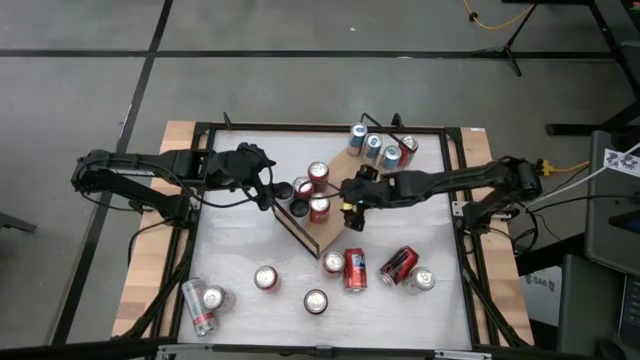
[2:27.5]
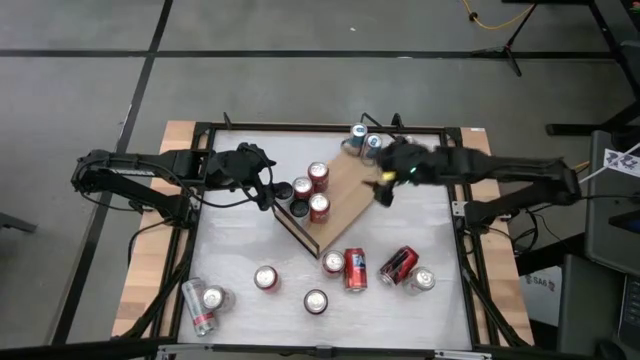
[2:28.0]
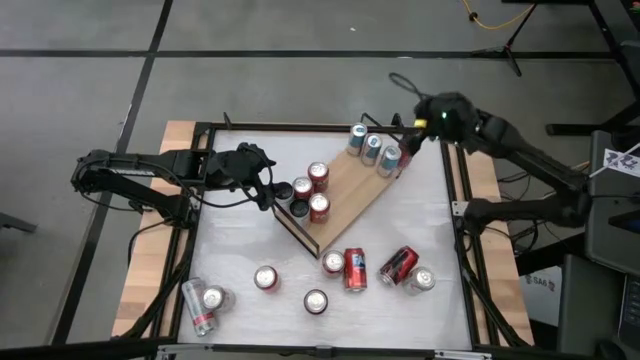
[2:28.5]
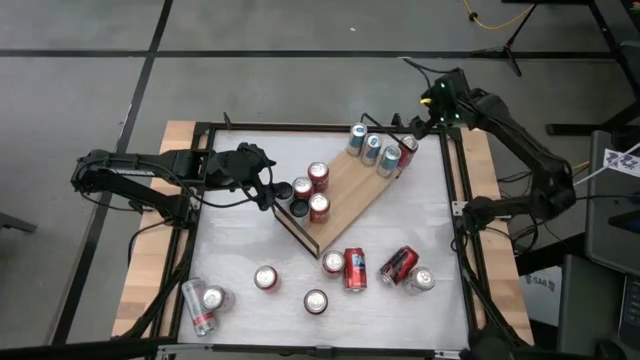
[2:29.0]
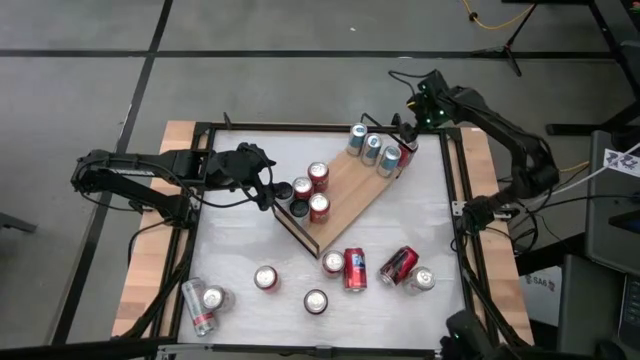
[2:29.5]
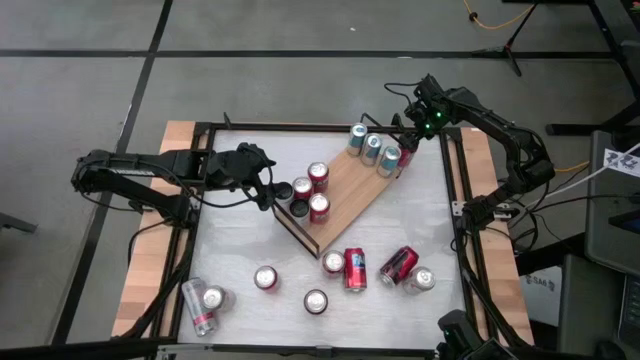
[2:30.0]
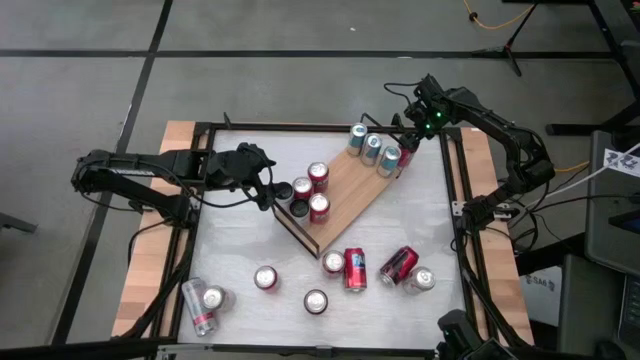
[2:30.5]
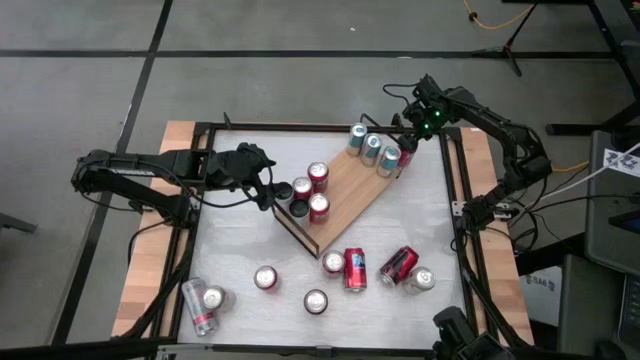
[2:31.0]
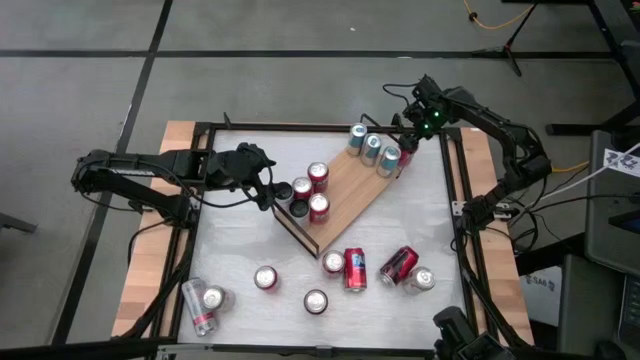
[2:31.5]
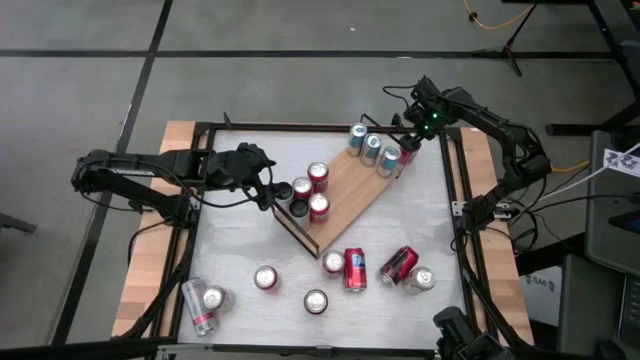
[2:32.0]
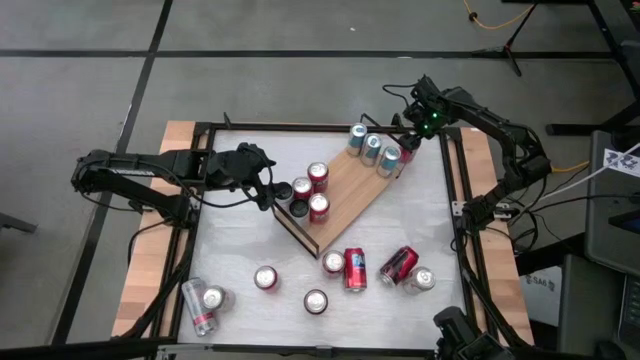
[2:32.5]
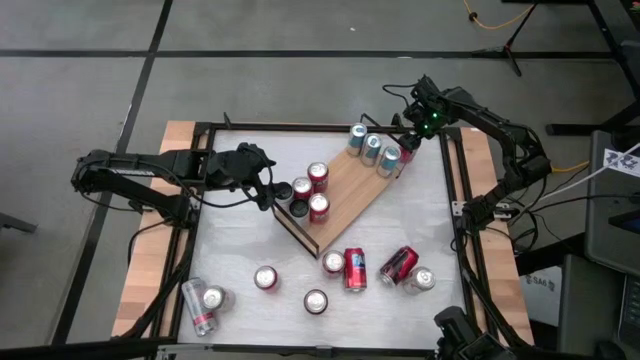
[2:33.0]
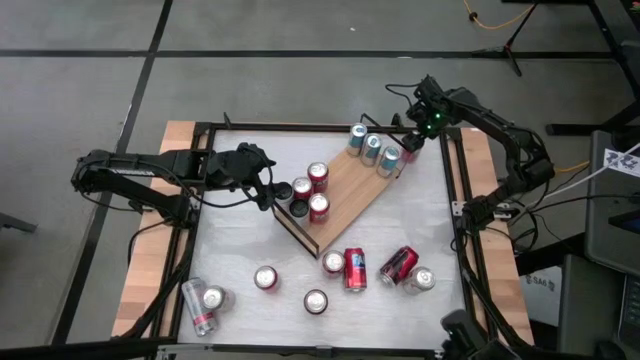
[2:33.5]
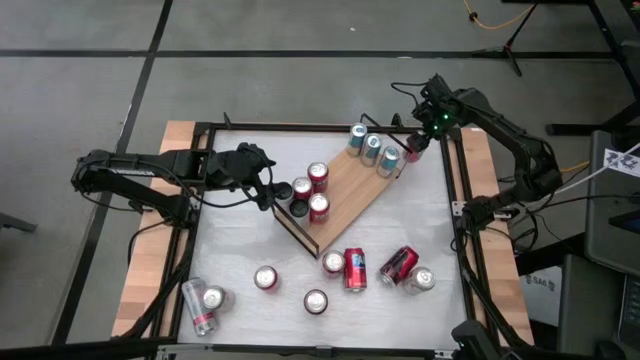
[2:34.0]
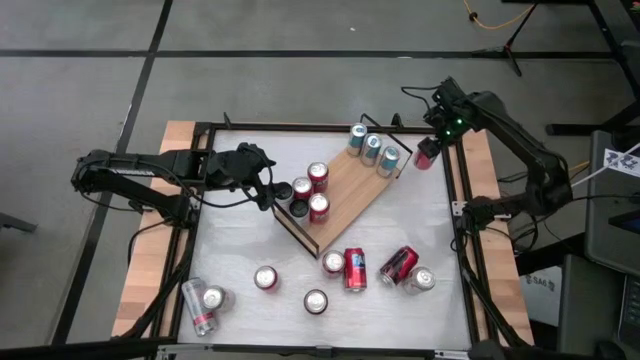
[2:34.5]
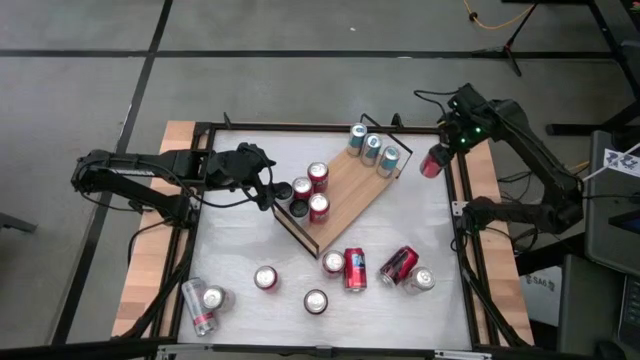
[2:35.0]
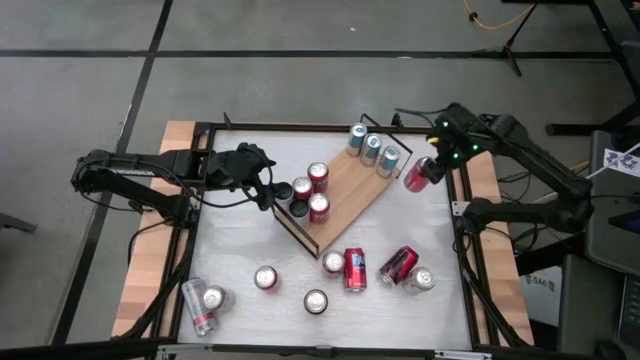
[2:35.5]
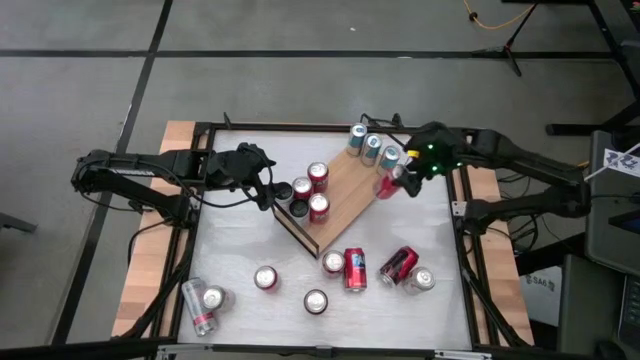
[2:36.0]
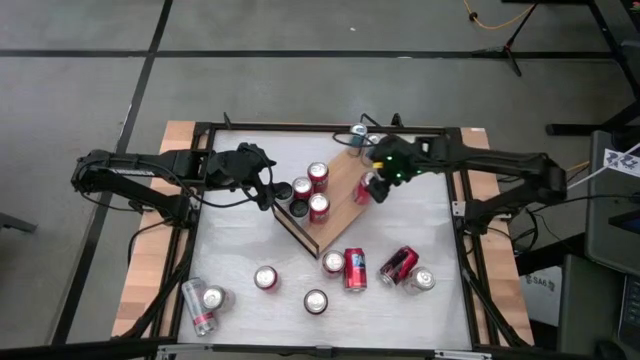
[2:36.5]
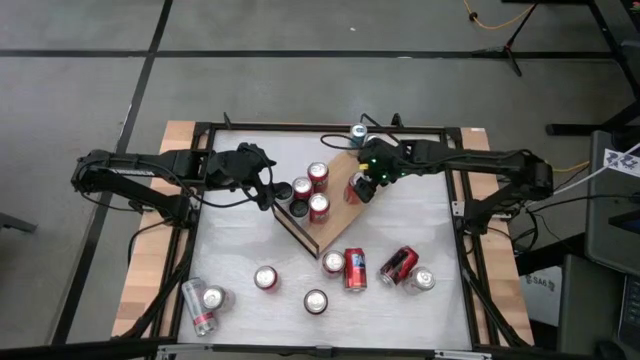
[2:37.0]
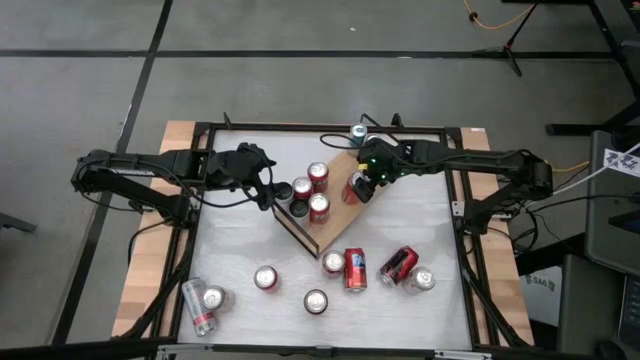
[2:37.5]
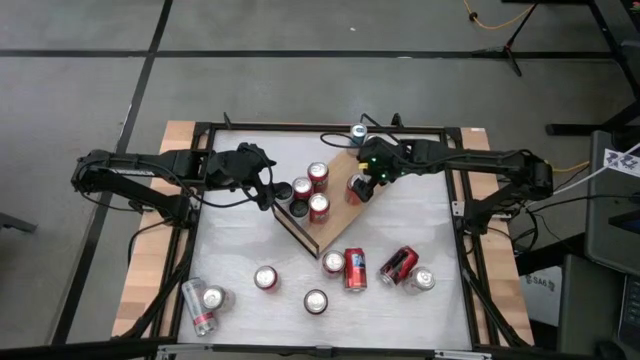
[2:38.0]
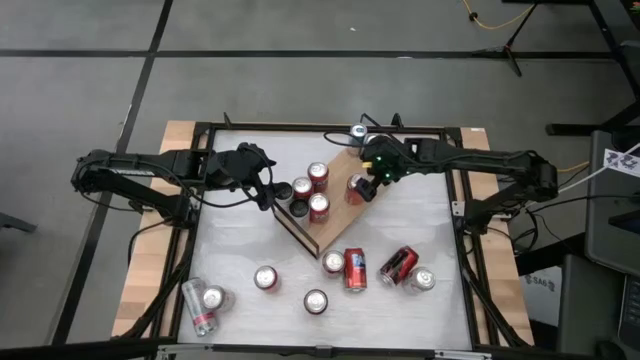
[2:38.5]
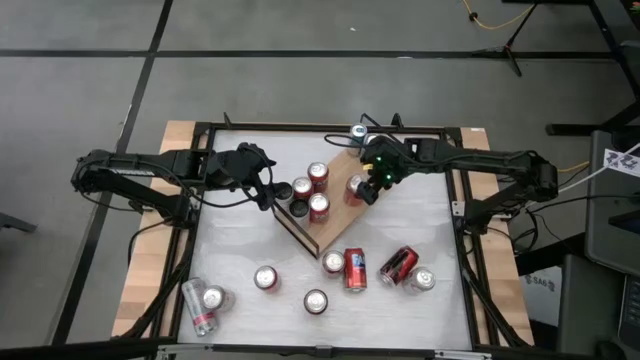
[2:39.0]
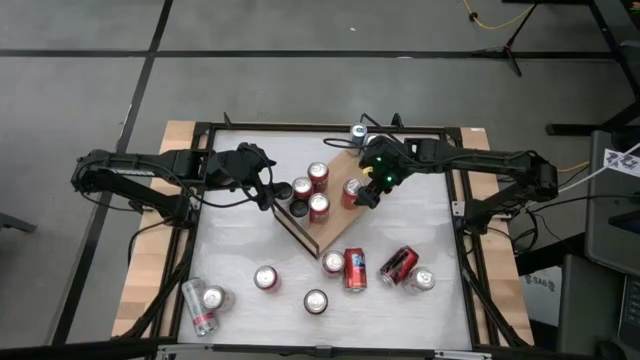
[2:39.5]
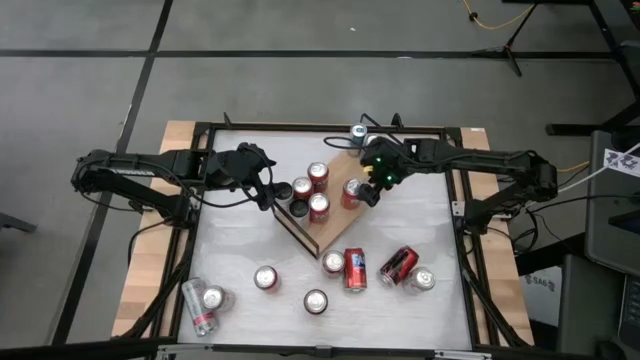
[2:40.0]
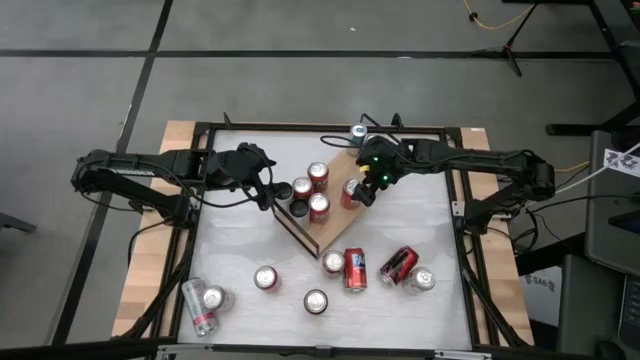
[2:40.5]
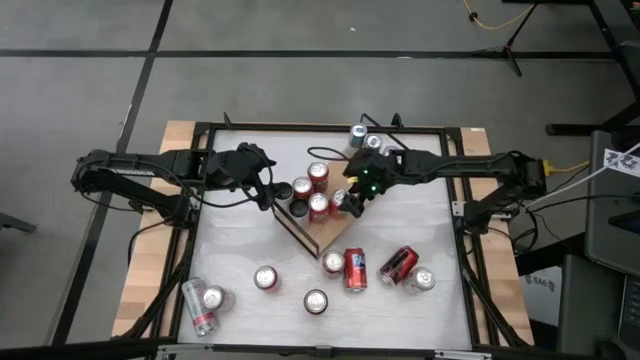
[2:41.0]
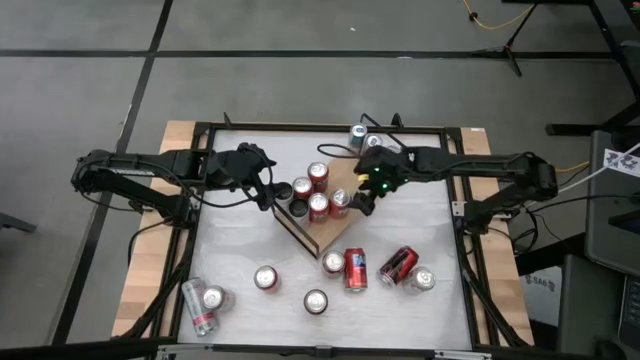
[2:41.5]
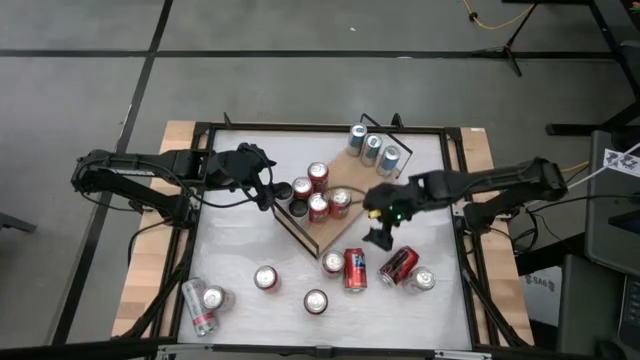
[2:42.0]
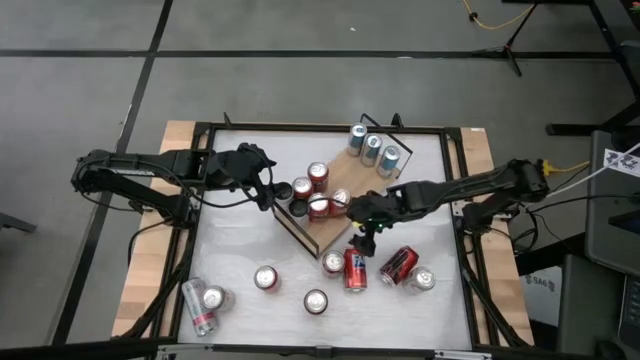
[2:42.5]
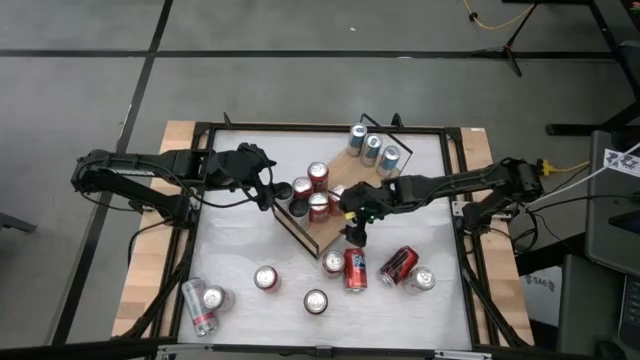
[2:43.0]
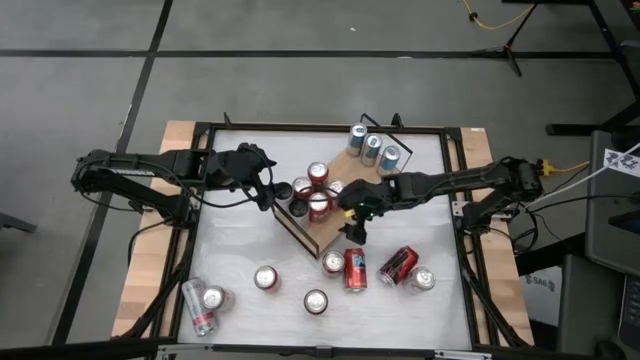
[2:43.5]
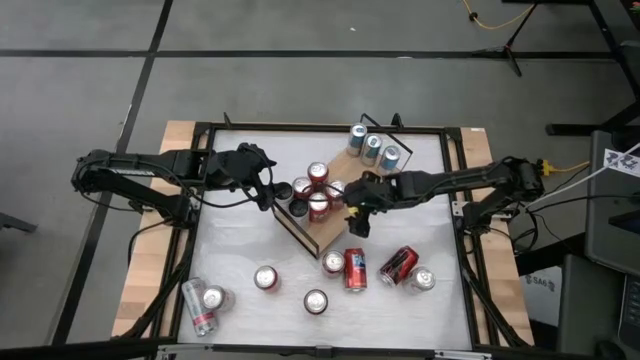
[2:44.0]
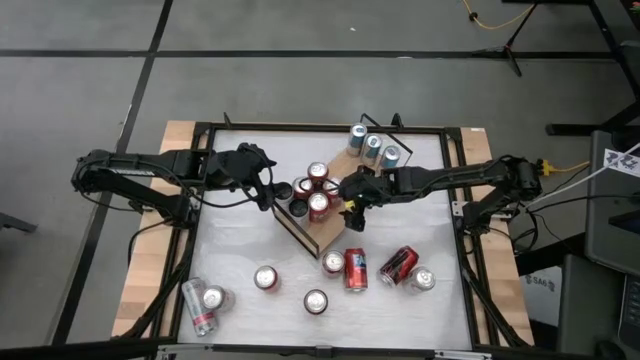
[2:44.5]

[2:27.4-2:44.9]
Task: Place canned beverage on shelf
Put the orange soda can on the shelf aligned with the other orange soda can

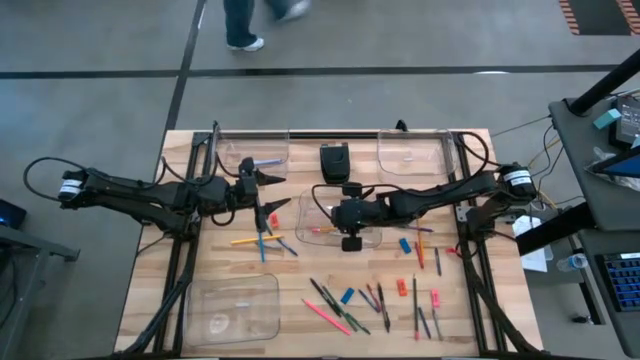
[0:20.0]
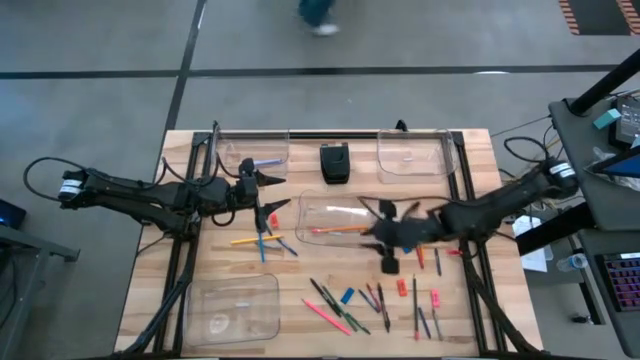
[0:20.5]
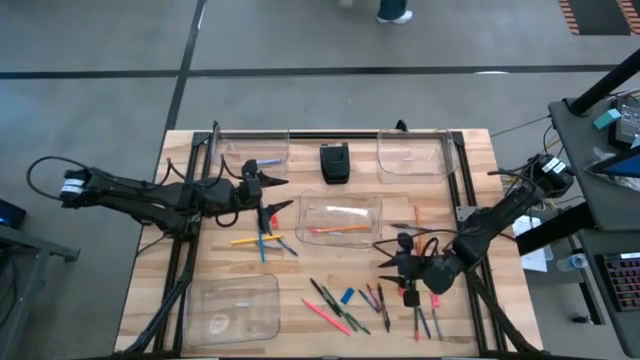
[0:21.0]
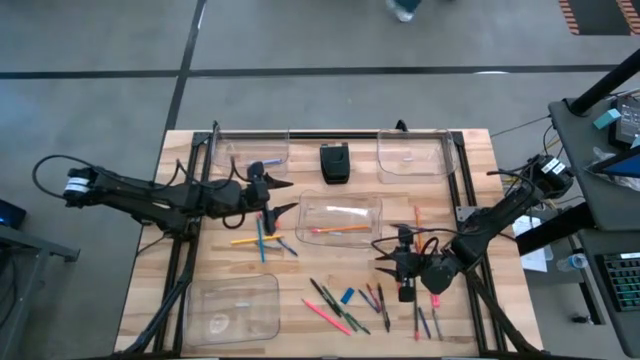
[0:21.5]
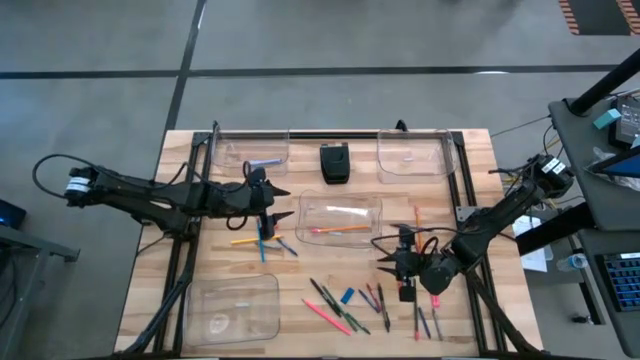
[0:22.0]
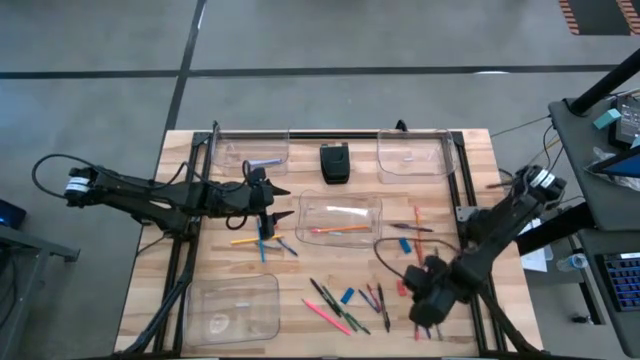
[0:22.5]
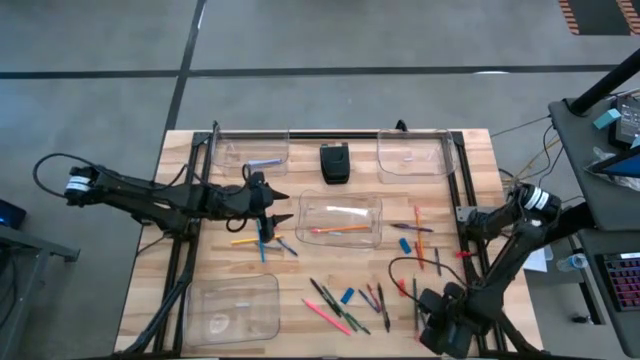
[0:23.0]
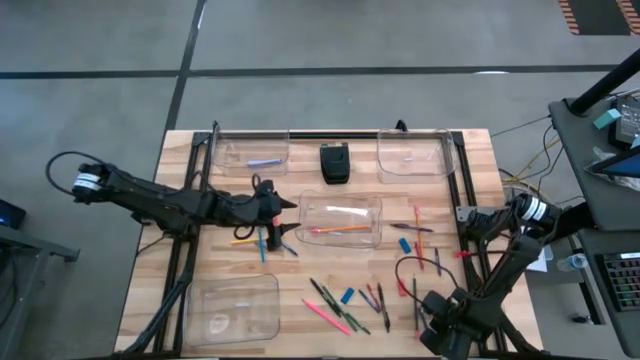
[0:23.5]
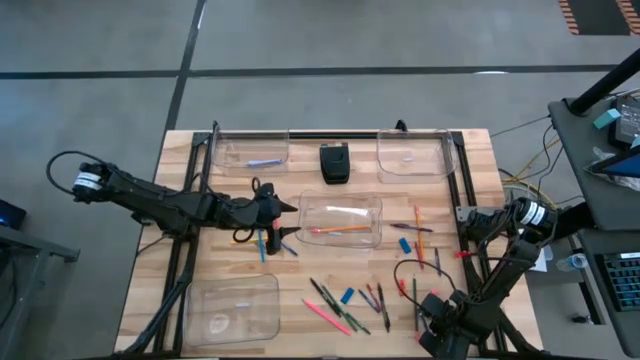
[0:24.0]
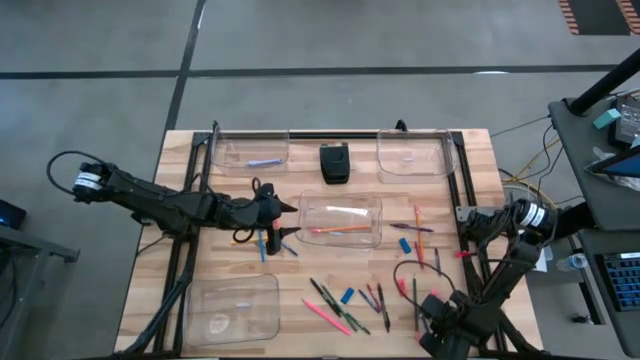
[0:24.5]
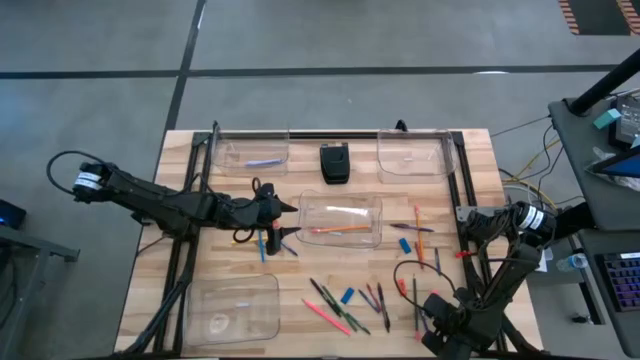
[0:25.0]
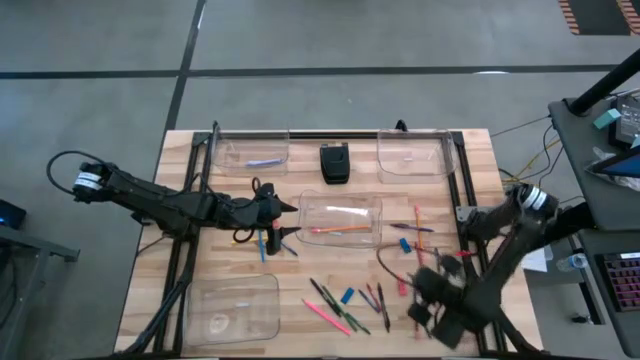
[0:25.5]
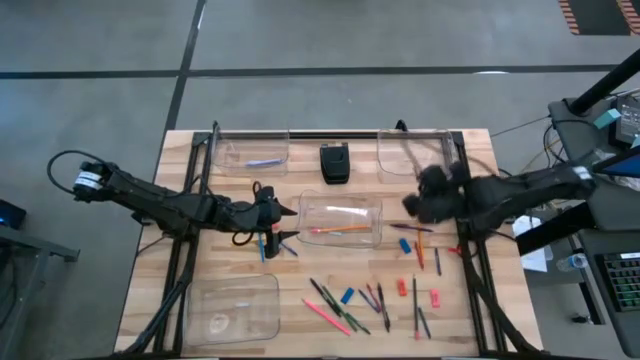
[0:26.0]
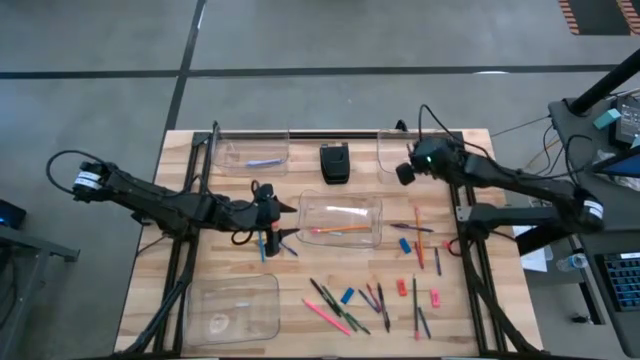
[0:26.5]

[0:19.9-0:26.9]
Task: Sort crayons/erasers/pens/pencils in bins
Put the gray crayon into the top right transparent bin
